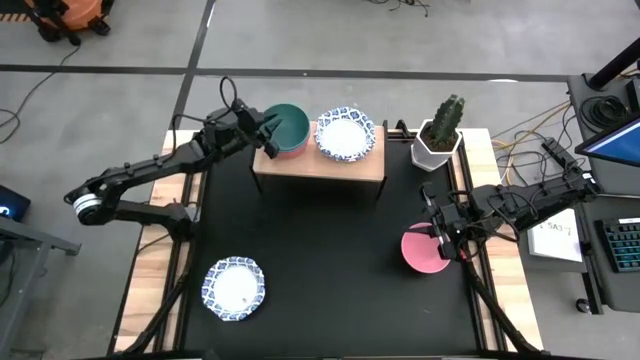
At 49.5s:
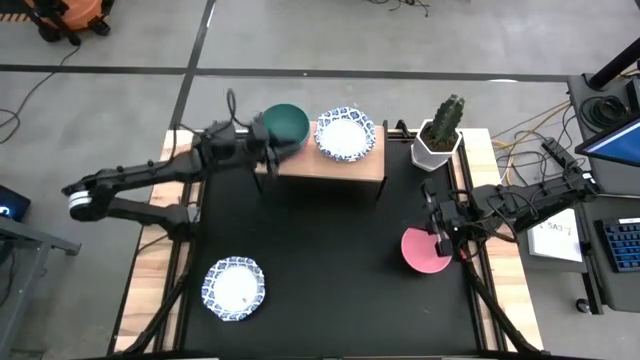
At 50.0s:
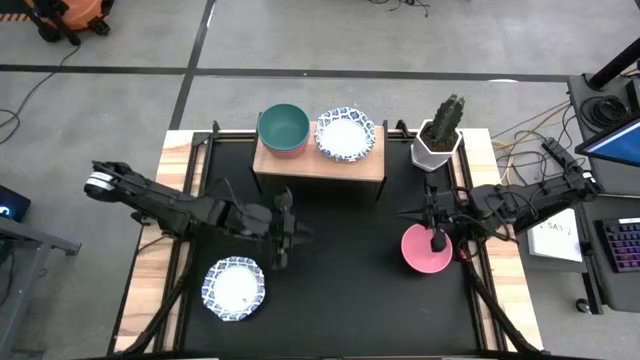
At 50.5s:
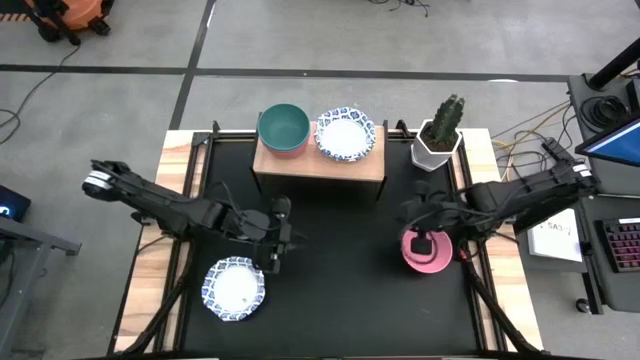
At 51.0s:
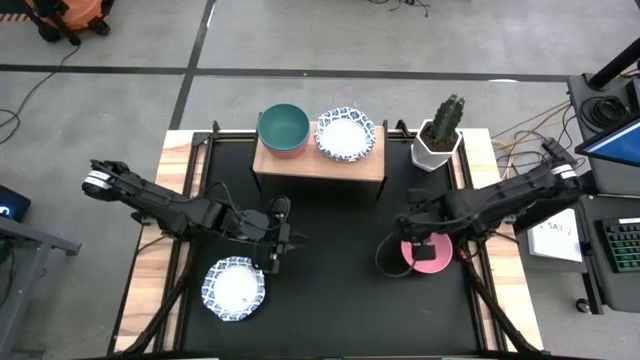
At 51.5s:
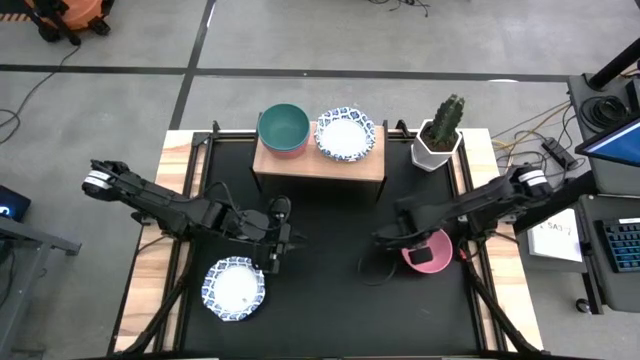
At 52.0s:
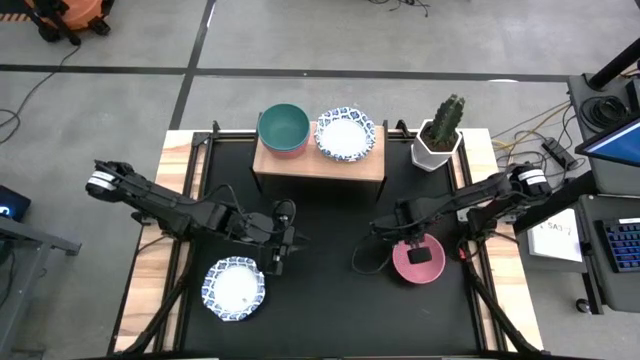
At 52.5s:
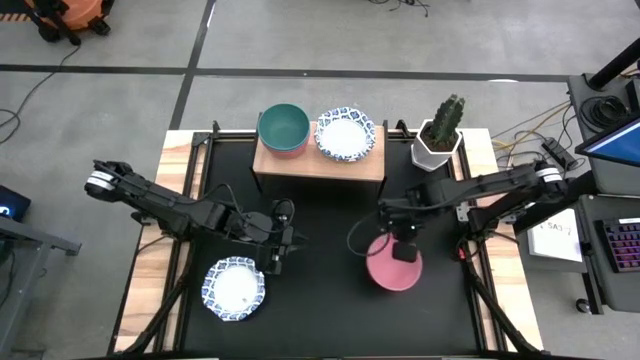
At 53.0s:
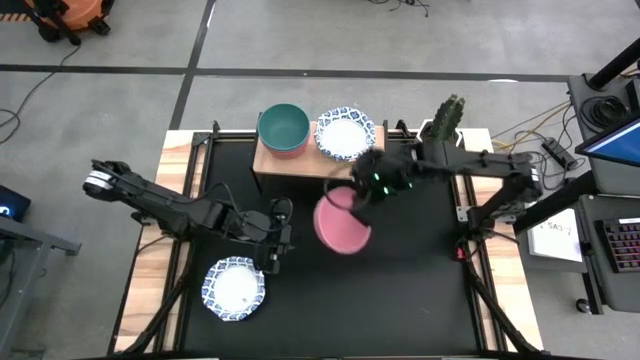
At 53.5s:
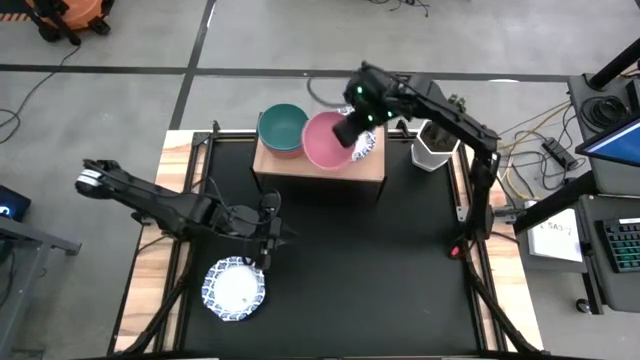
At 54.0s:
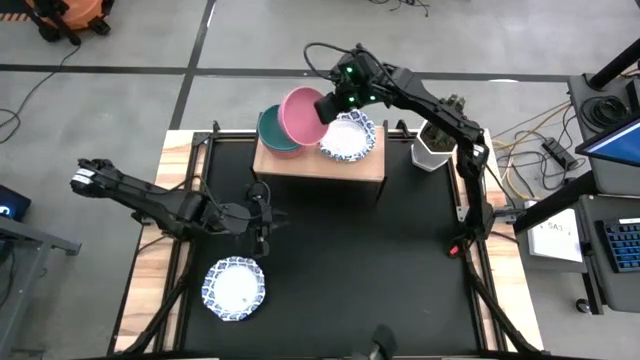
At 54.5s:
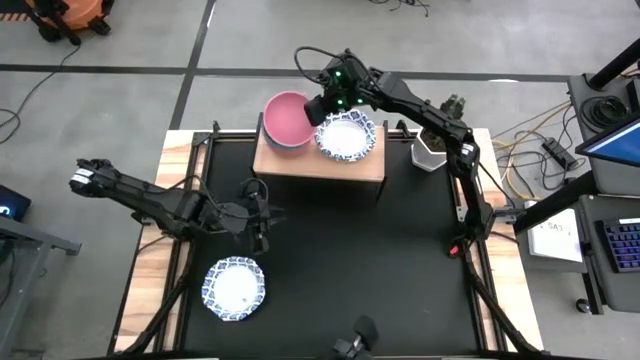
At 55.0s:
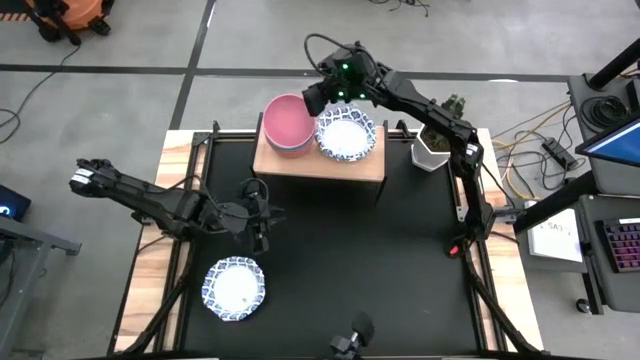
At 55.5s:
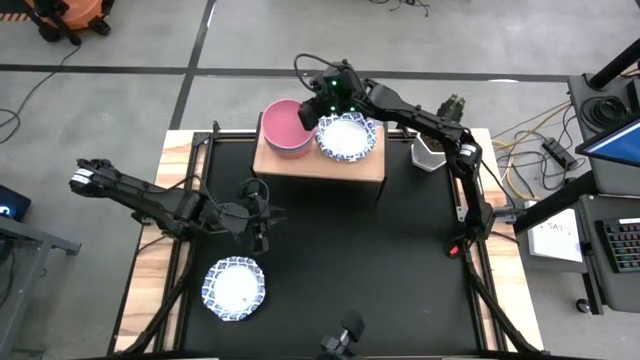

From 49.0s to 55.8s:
Task: Place and stack bowls onto a shelf
Stack the pink bowl on top of the green bowl on the shelf

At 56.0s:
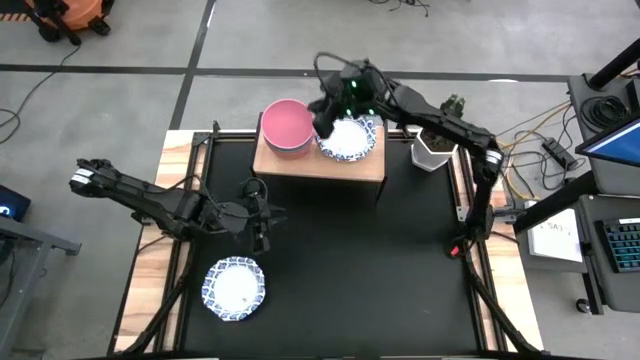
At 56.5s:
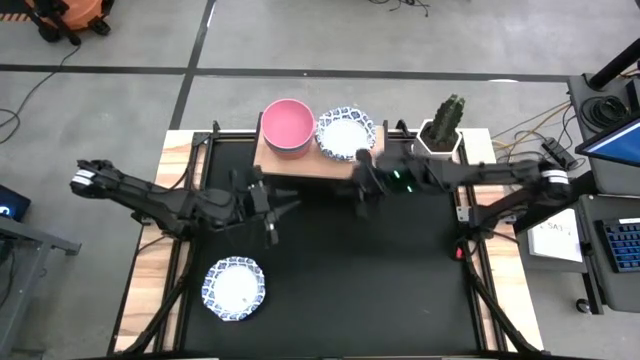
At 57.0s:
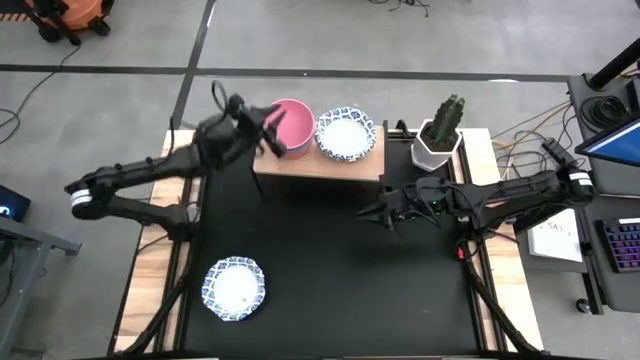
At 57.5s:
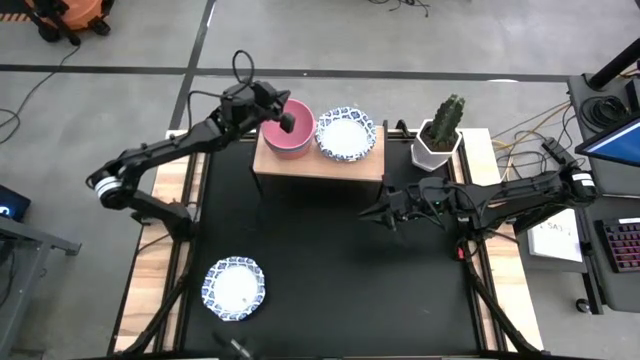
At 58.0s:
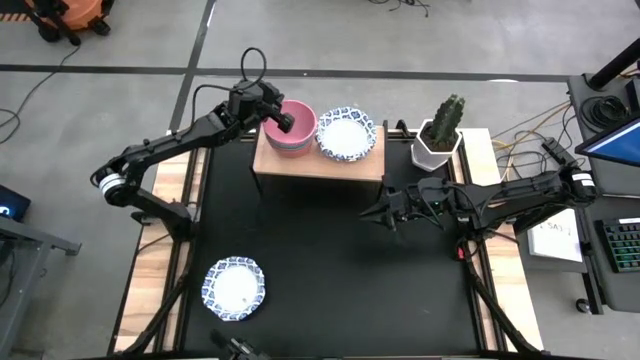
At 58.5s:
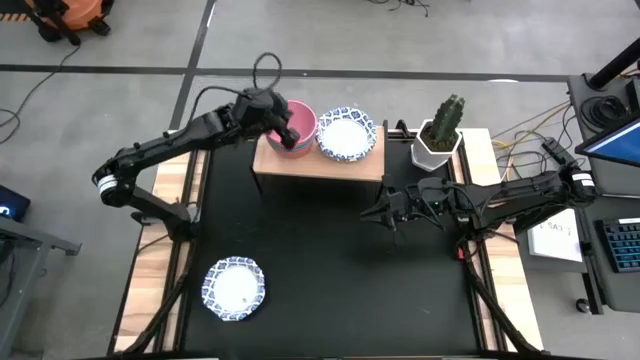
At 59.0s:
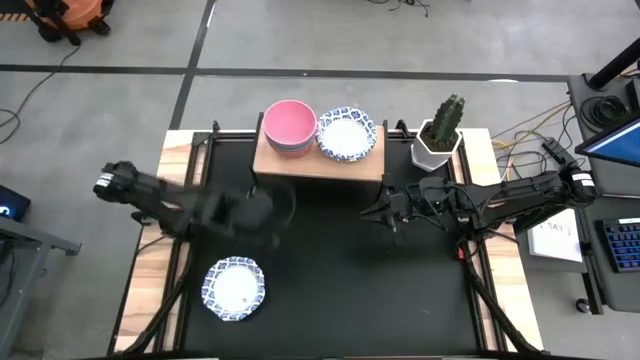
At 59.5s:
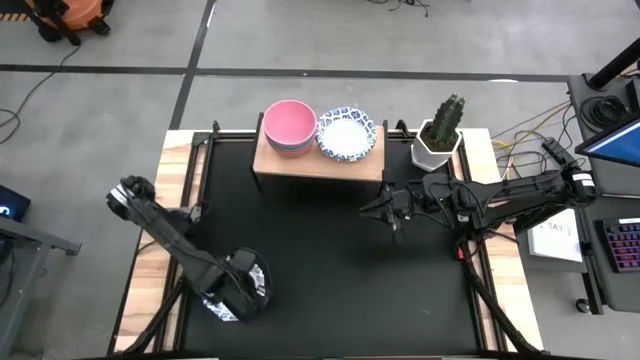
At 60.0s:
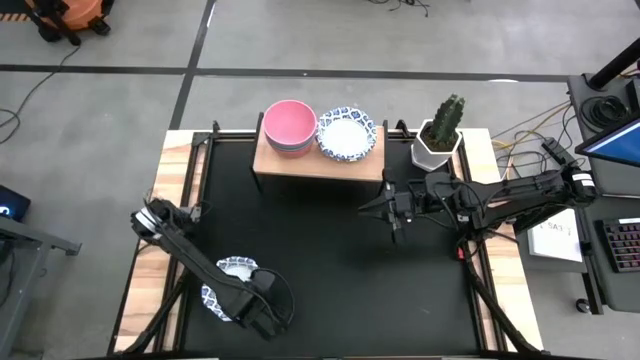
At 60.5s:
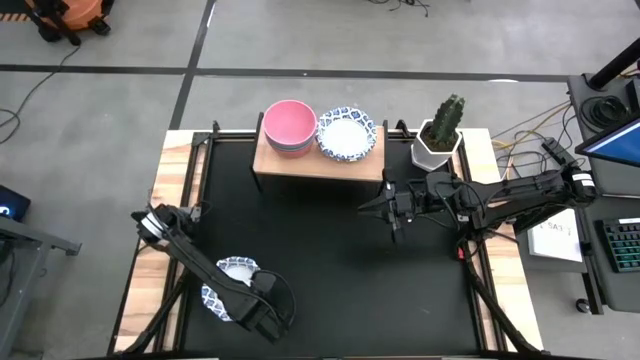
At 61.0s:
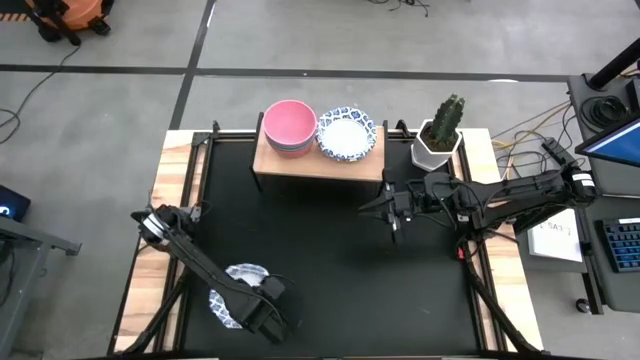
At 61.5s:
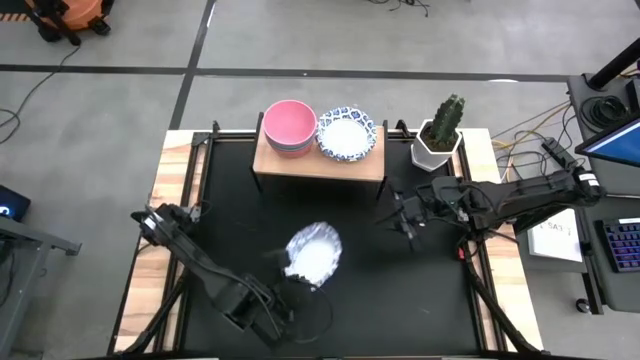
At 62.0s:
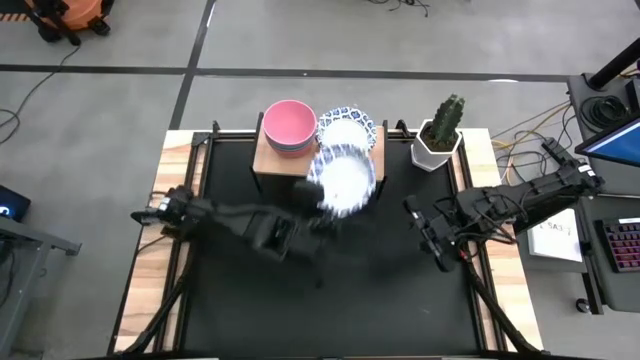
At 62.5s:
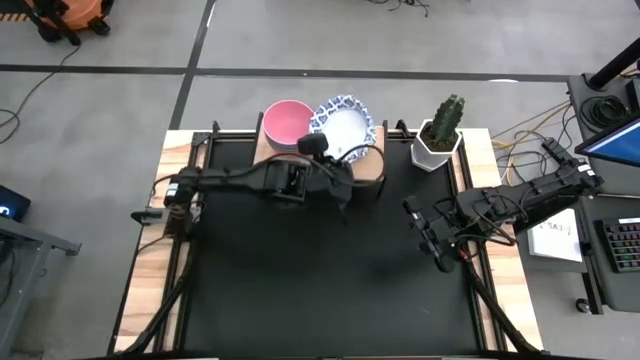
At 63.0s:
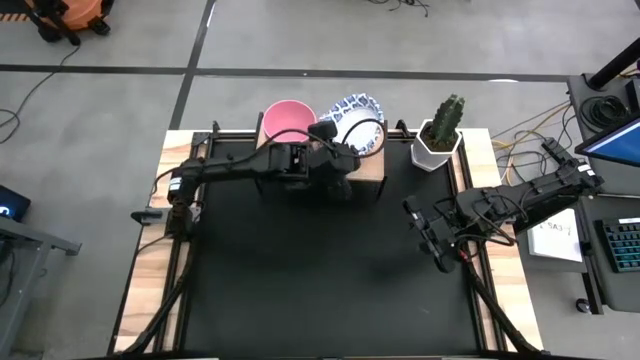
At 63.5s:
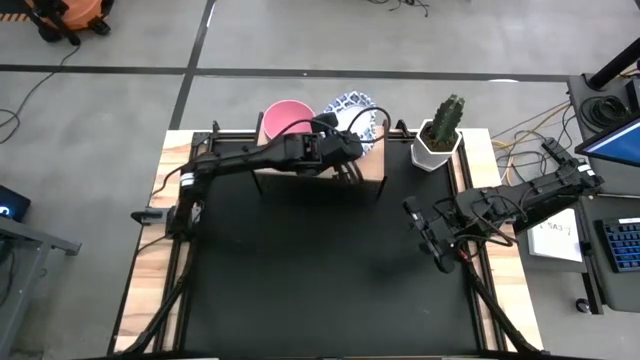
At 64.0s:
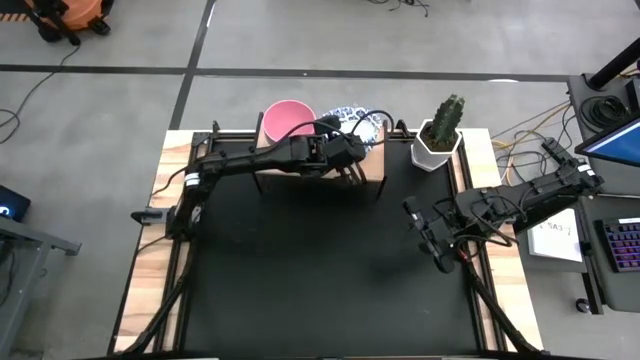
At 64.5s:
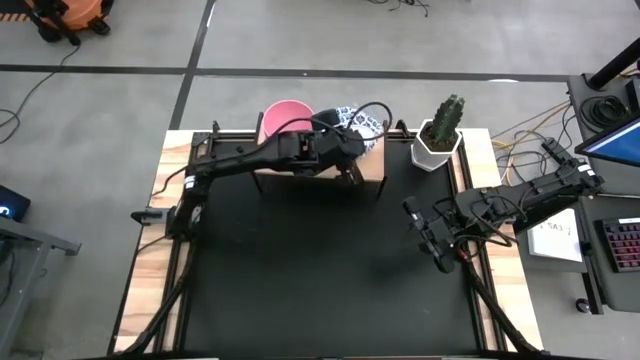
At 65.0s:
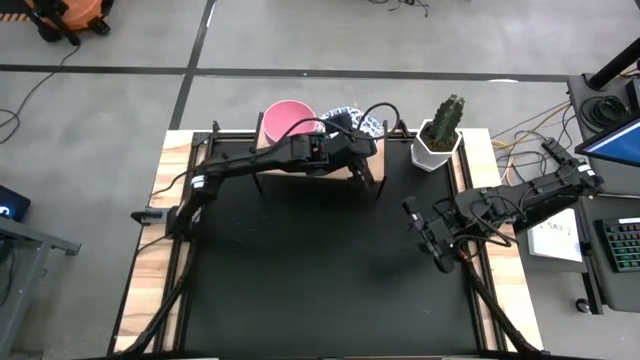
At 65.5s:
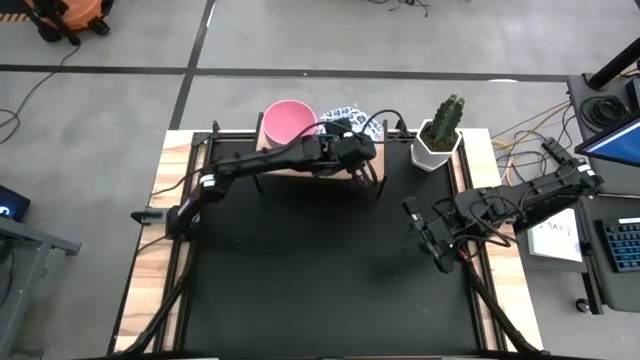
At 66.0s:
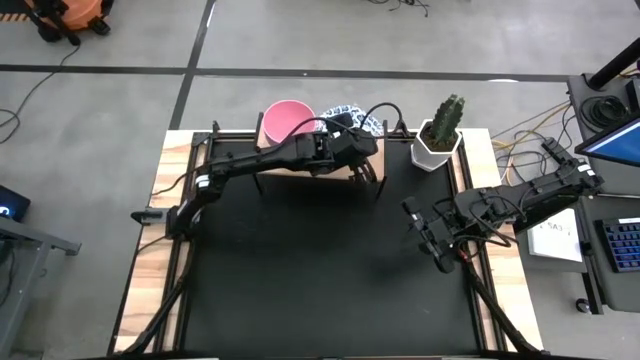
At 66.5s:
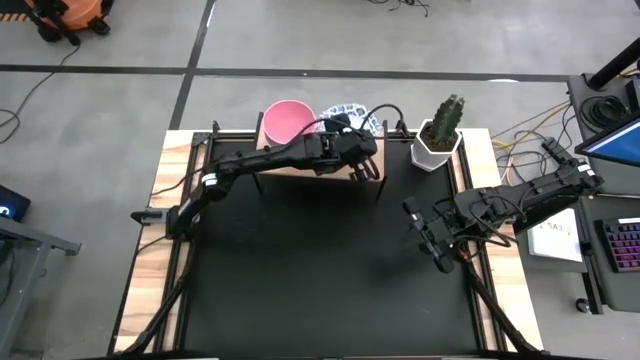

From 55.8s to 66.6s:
Stack the white bowl on top of the white bowl on the shelf

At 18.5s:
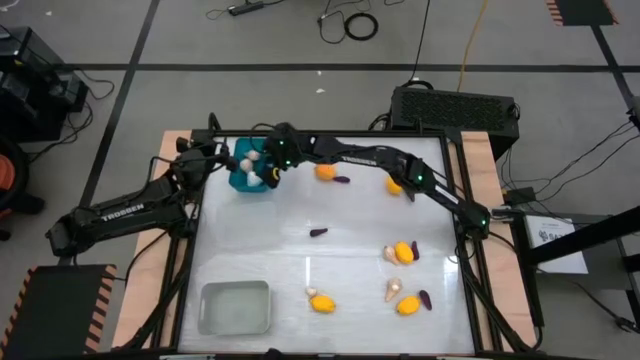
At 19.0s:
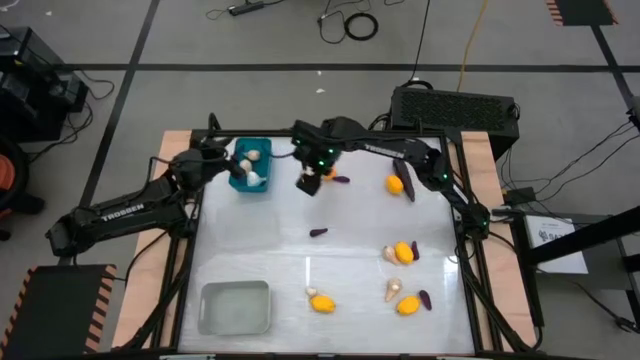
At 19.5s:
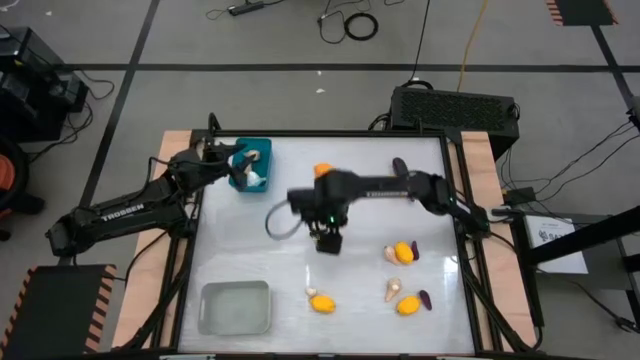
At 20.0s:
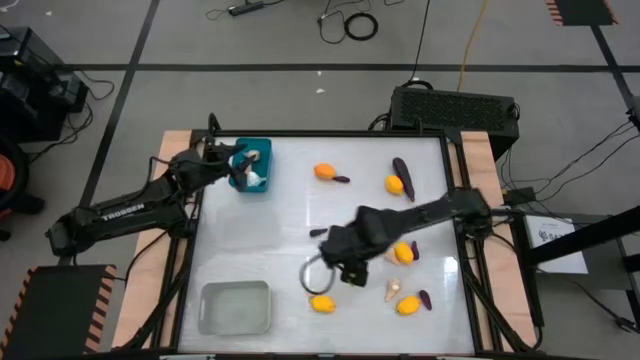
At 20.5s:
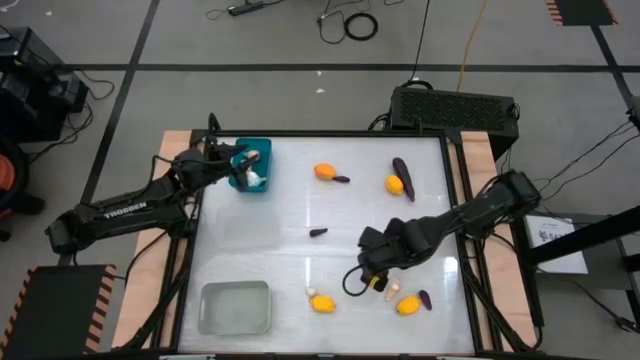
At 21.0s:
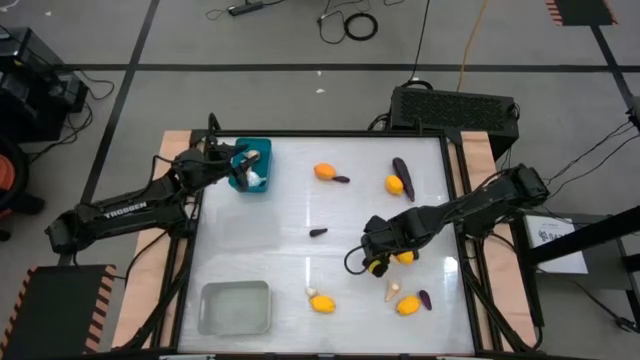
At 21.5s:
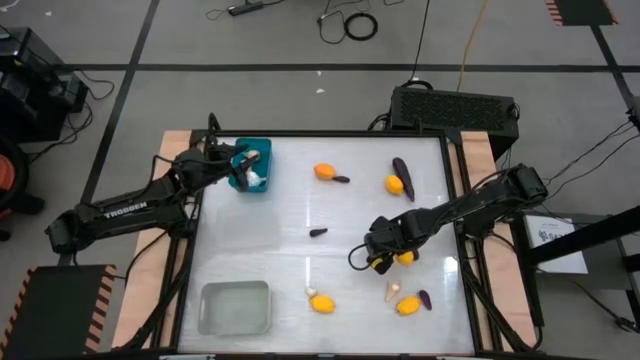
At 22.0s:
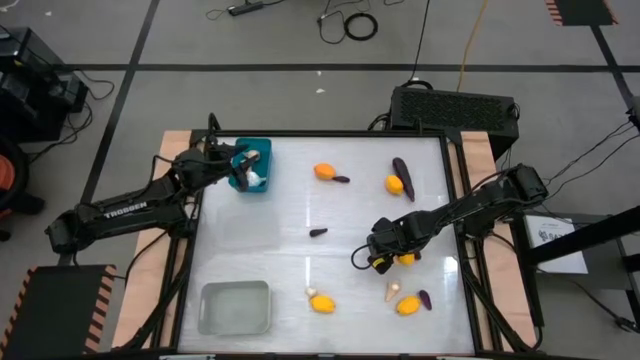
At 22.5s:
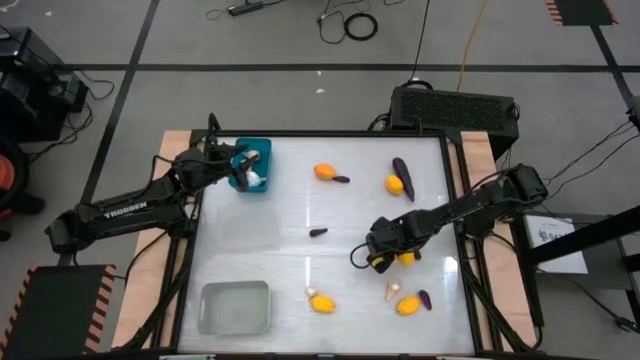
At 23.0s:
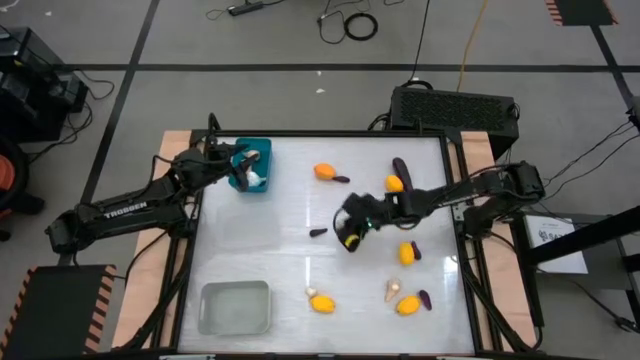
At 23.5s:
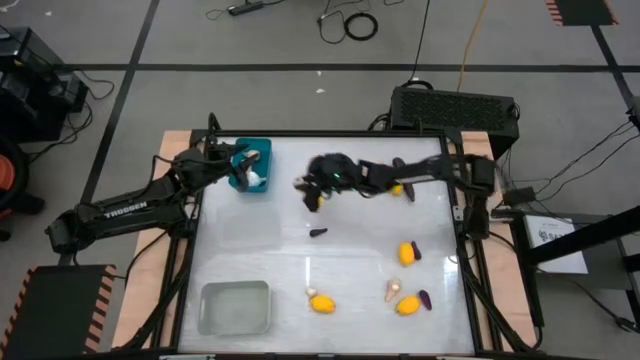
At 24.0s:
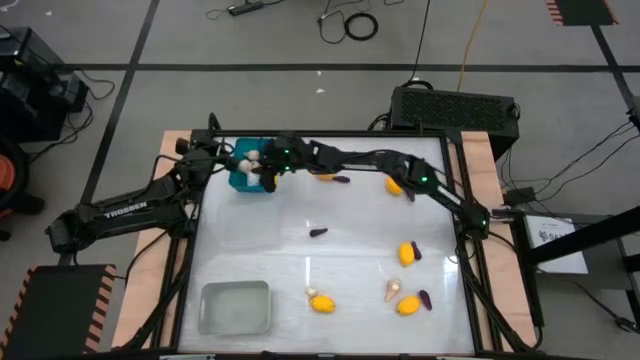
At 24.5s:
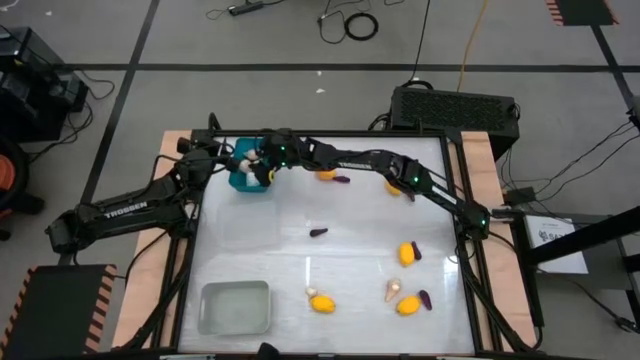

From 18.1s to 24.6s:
Task: Sort produce into baskets
Put the garlic into the blue bin
